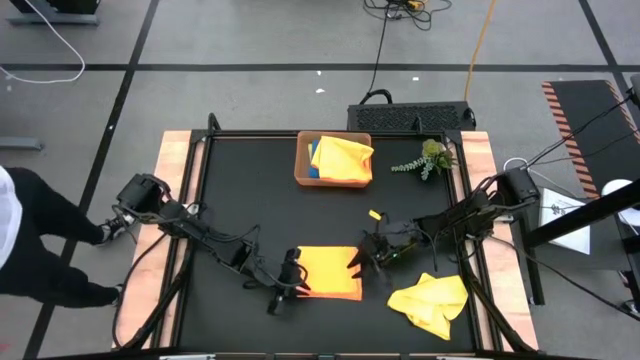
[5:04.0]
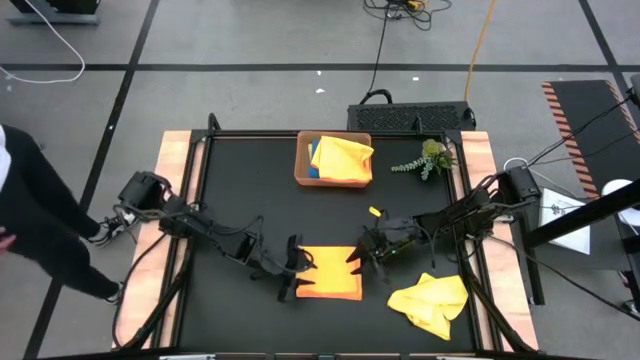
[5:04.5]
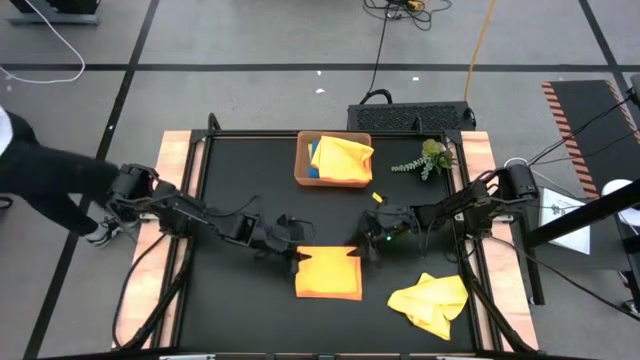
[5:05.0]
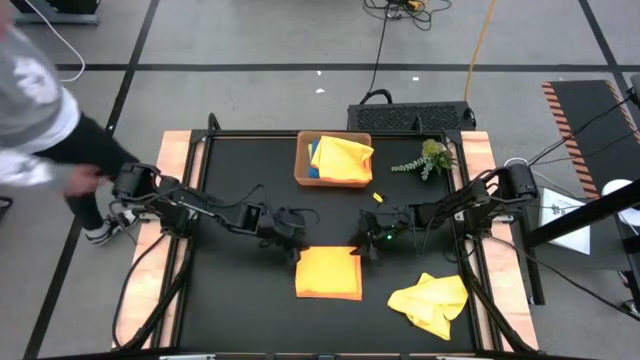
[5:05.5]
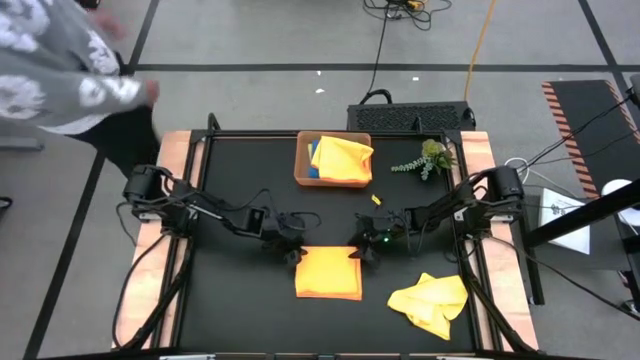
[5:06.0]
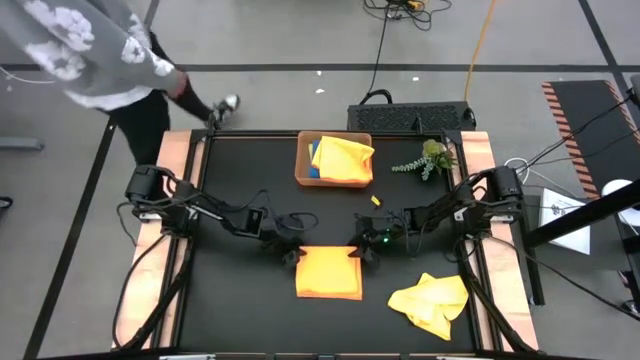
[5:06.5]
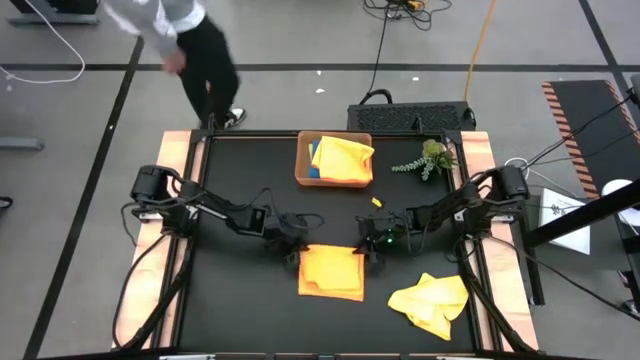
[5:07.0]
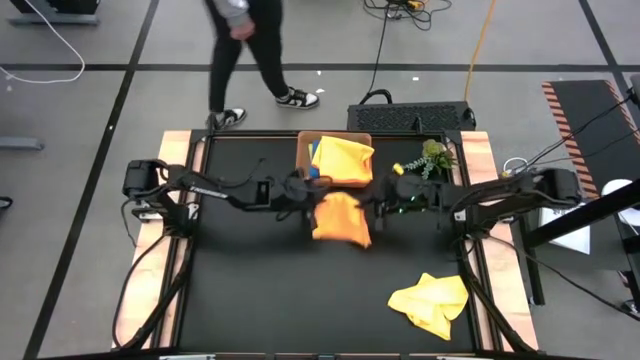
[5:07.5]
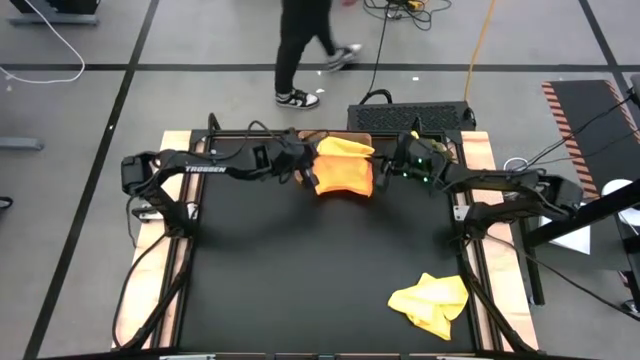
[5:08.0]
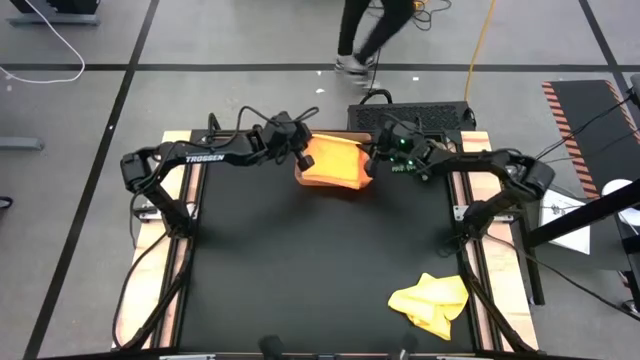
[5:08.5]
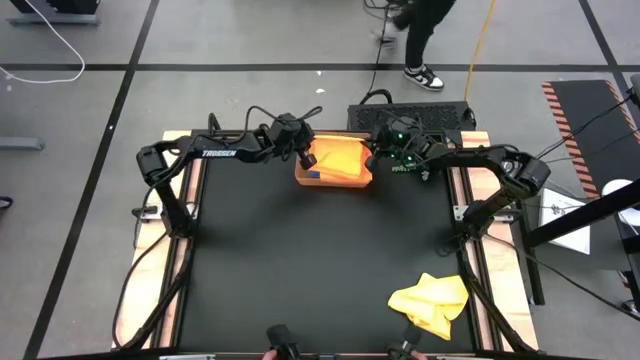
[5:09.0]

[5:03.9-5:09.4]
Task: Fold microfiber towels
Put the orange microfiber towel into the bin

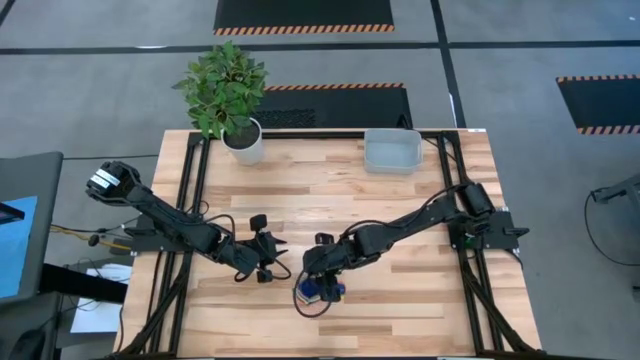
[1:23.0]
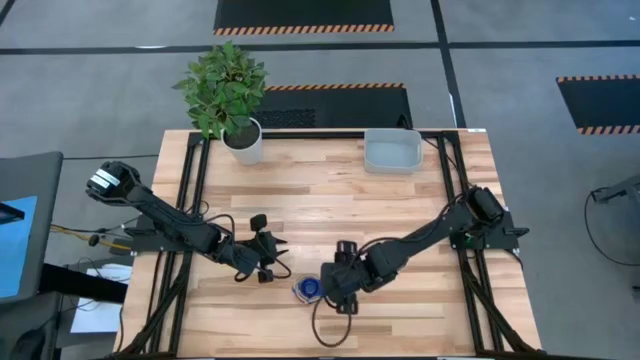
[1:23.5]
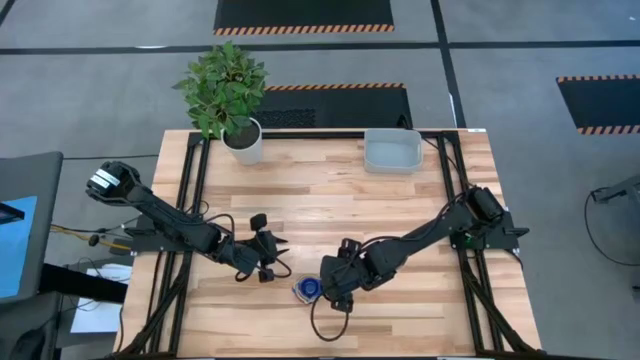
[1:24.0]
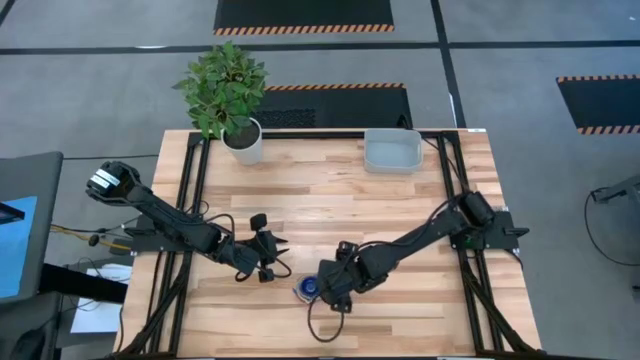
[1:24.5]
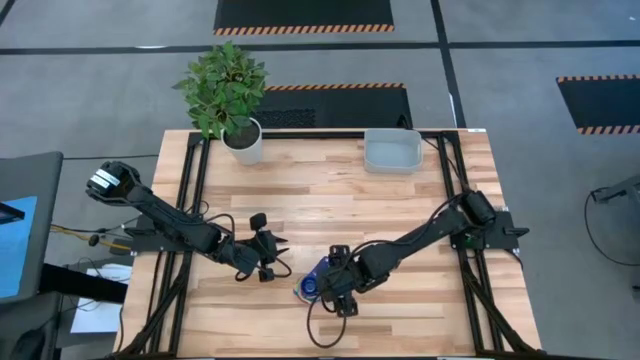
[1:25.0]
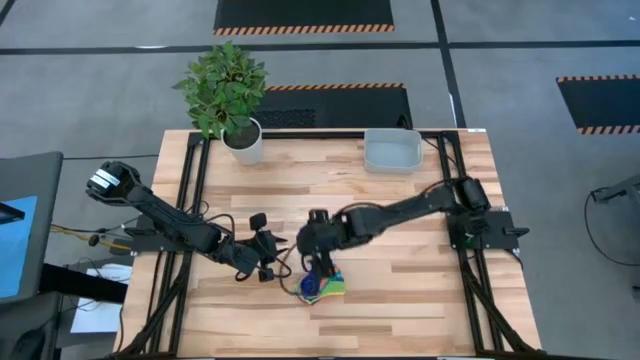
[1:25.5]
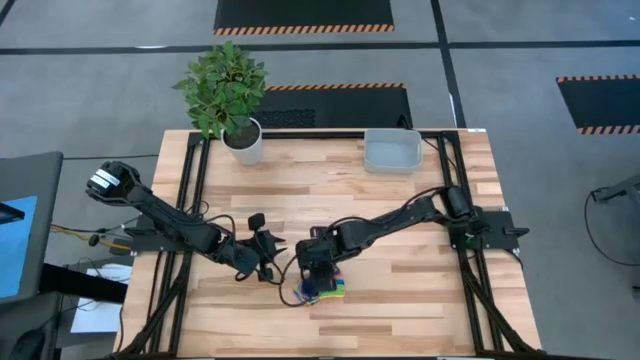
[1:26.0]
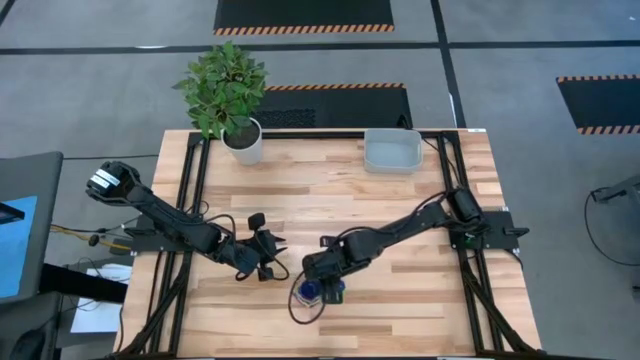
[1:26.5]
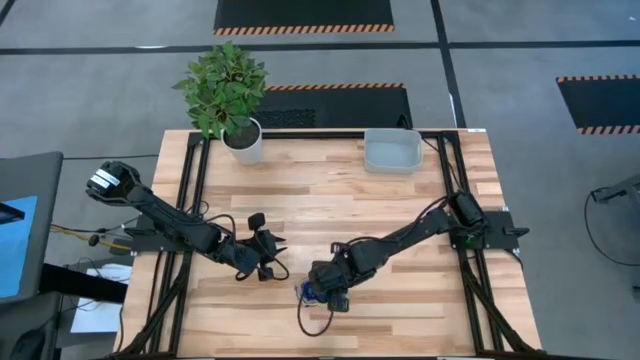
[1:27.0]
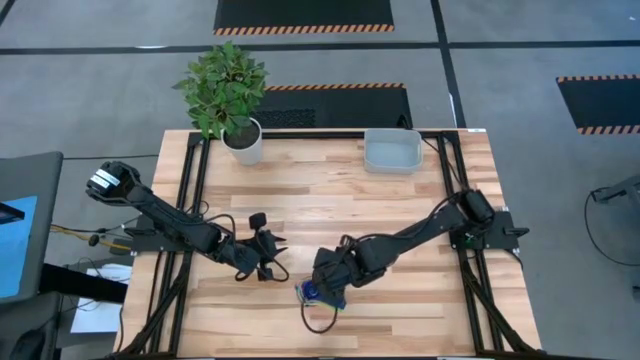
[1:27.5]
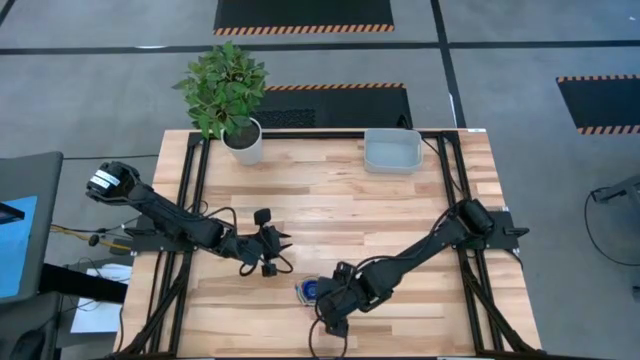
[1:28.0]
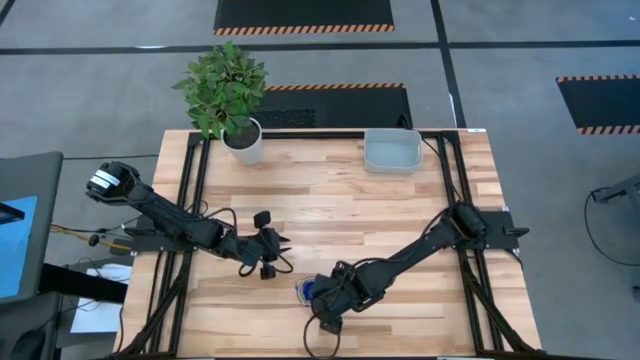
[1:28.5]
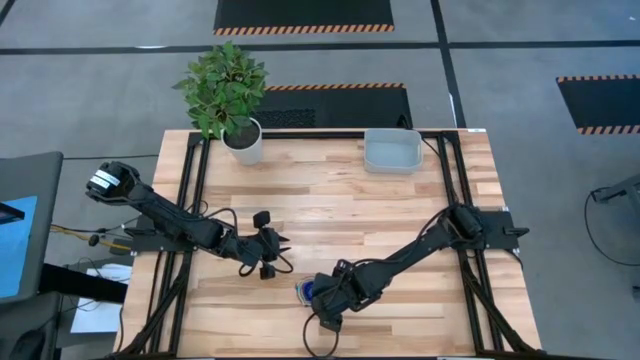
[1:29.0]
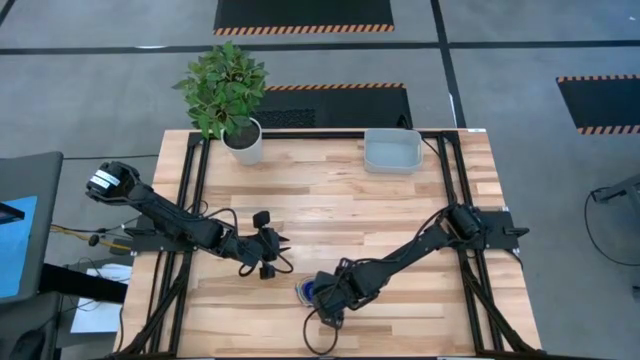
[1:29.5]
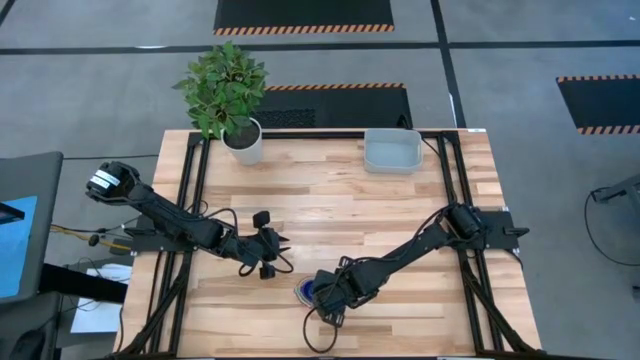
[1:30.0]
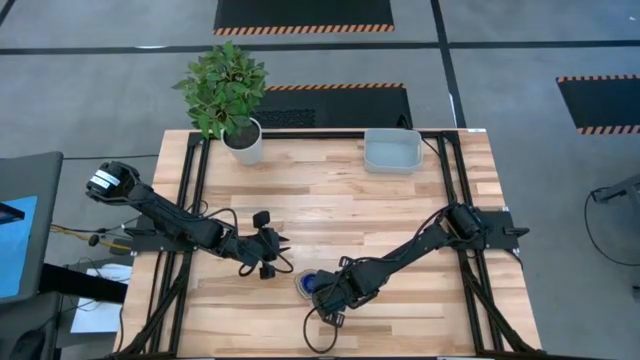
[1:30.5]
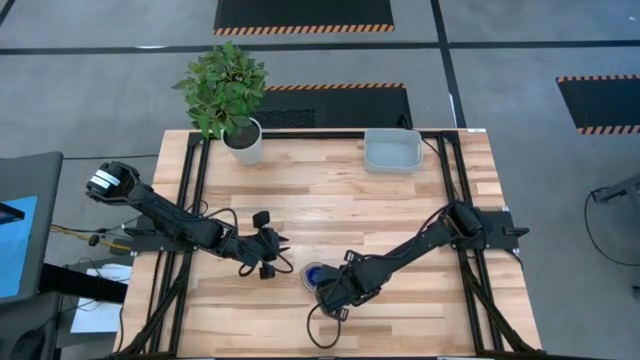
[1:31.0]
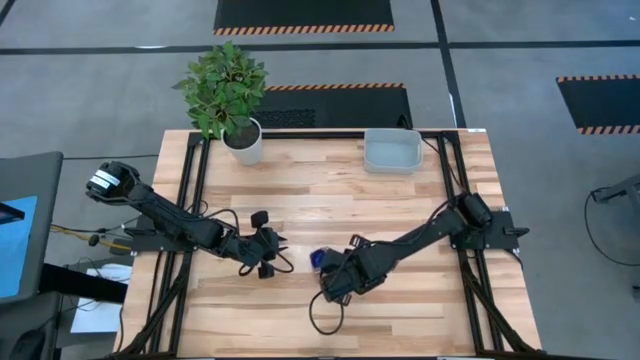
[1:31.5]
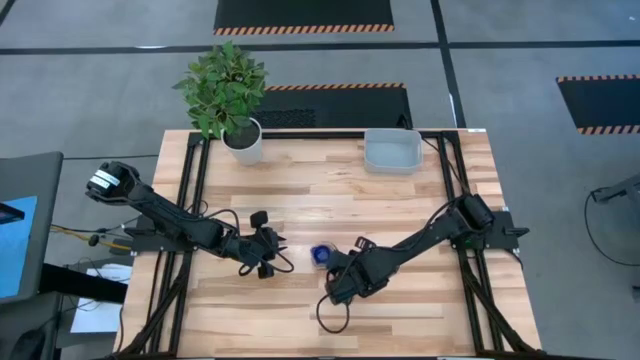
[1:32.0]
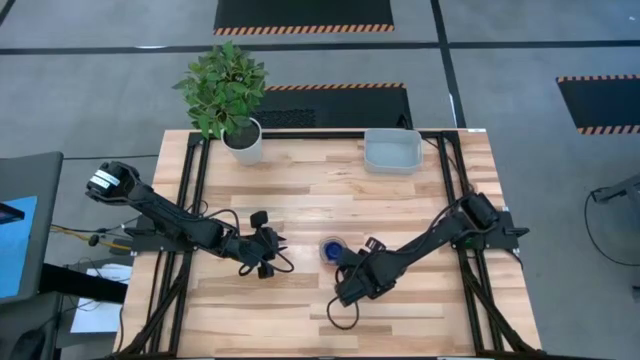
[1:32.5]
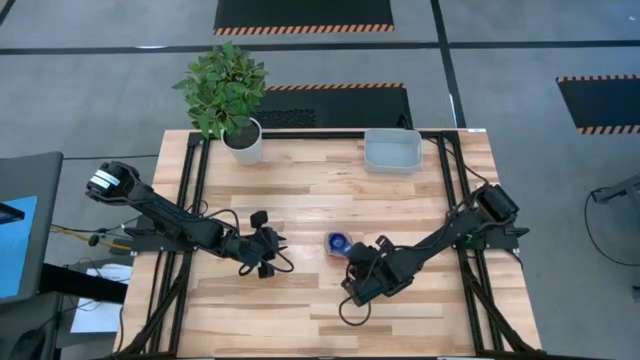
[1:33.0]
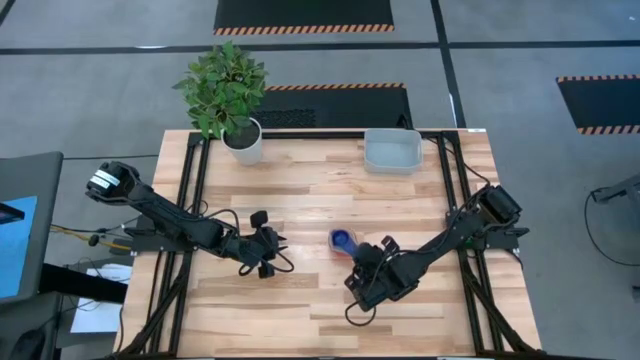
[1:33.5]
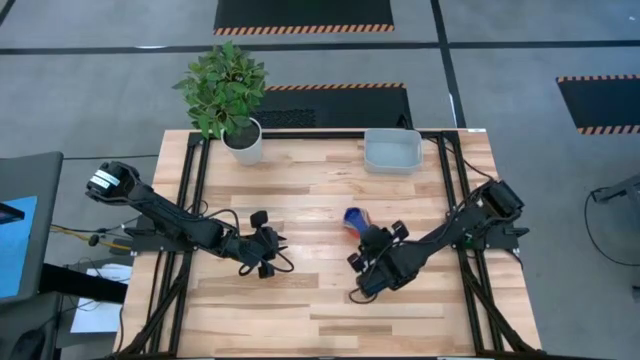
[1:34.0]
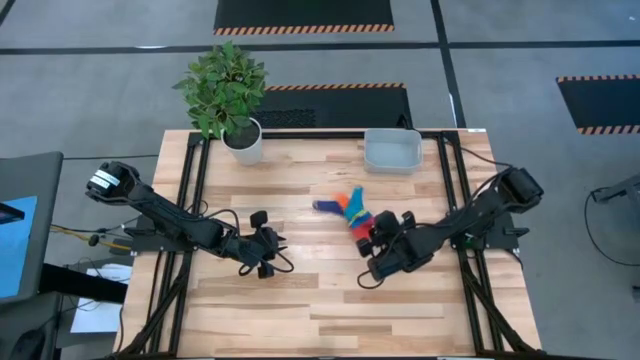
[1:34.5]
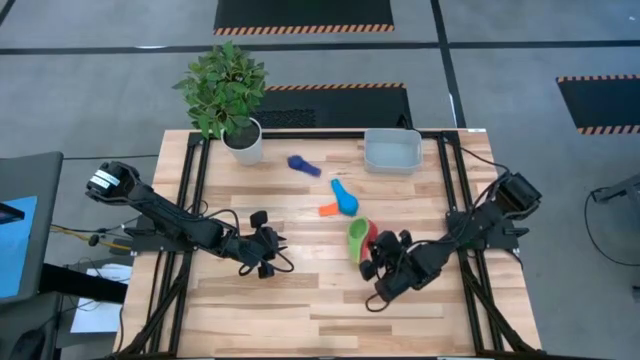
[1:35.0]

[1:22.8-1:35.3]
Task: Nest measuring cups in basket
Put the stacked measuring cups into the gray bin

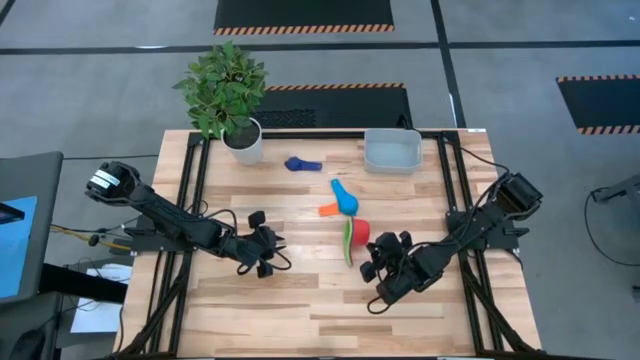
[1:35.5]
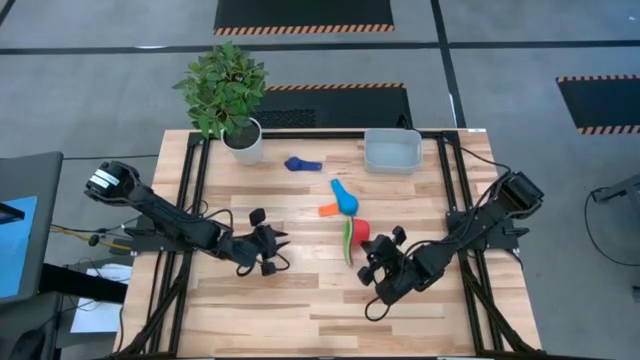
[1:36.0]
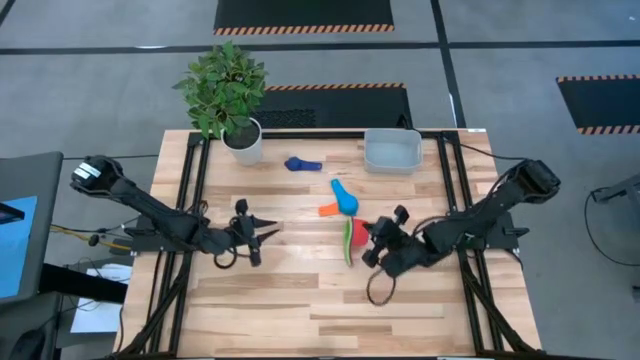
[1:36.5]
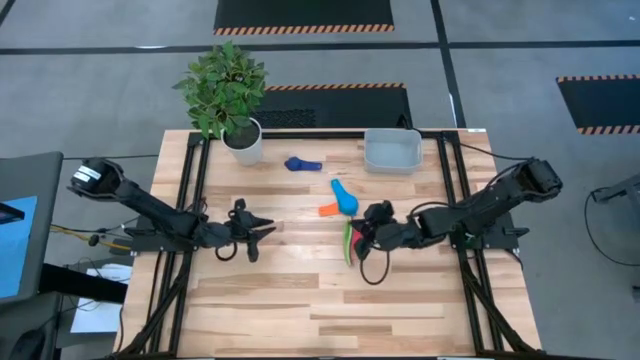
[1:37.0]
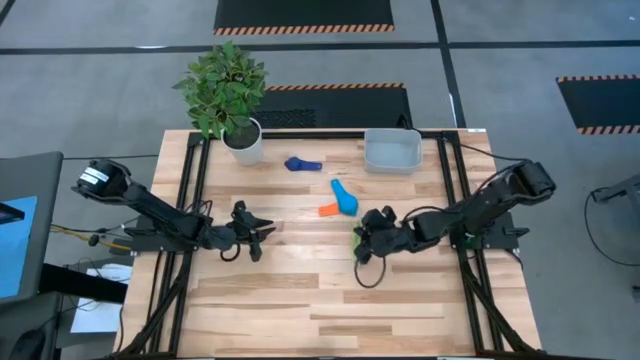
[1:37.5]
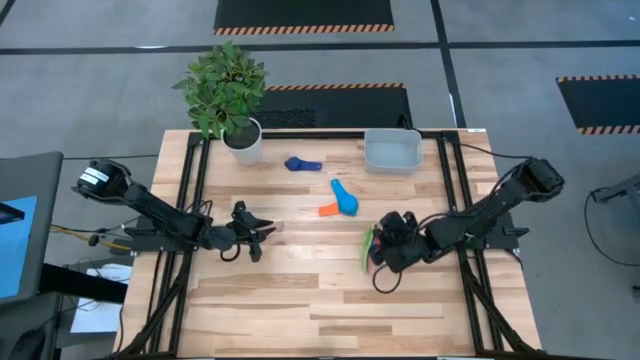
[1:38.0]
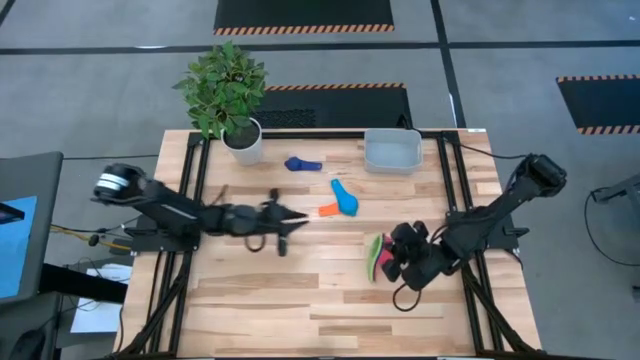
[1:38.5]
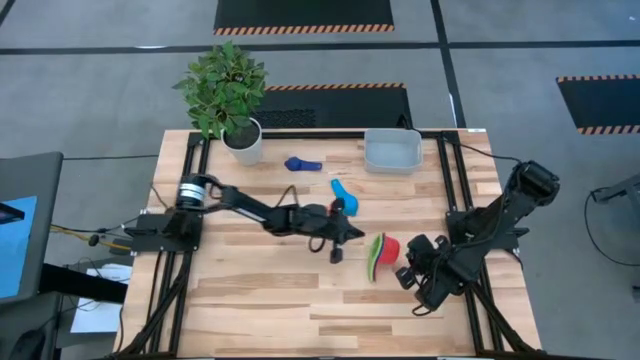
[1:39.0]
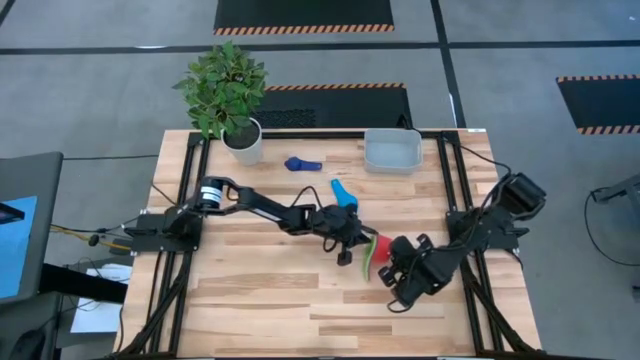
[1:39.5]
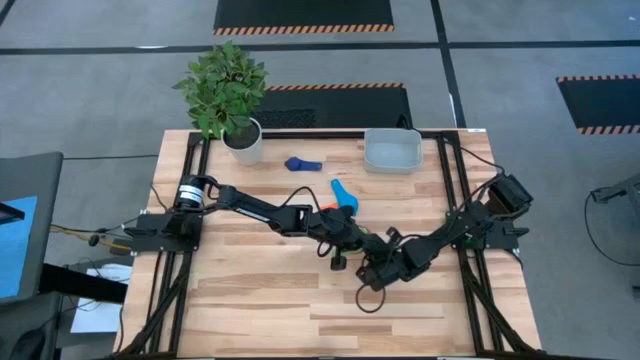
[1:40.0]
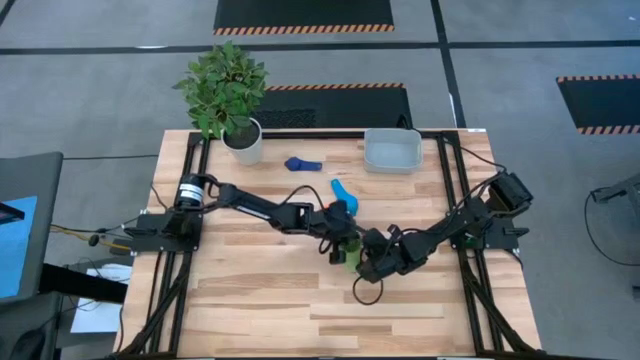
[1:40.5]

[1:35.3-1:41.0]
Adjust the stacked measuring cups on the table
